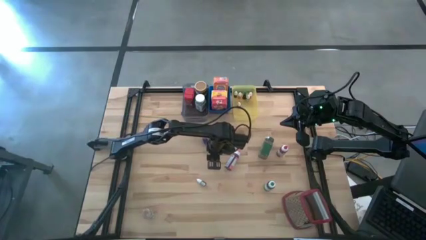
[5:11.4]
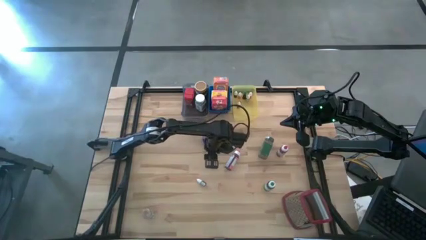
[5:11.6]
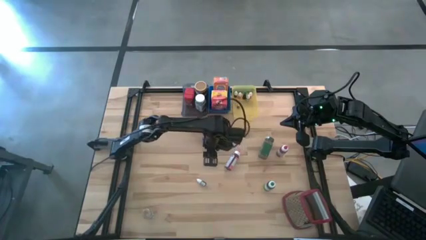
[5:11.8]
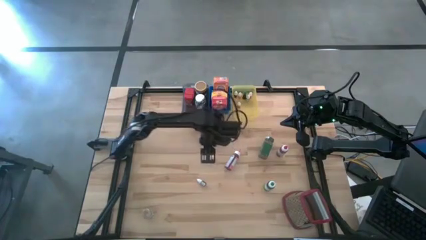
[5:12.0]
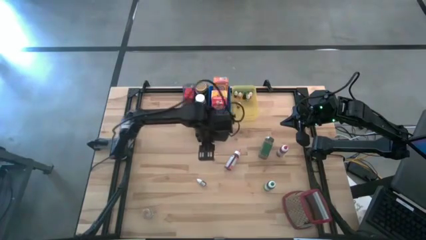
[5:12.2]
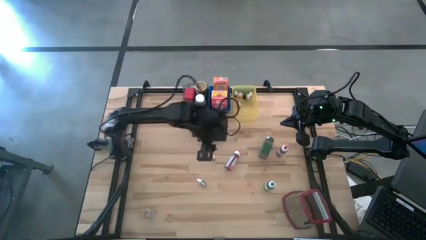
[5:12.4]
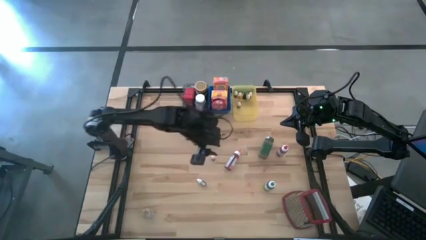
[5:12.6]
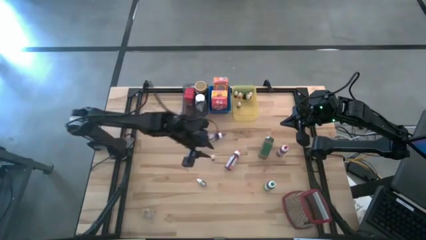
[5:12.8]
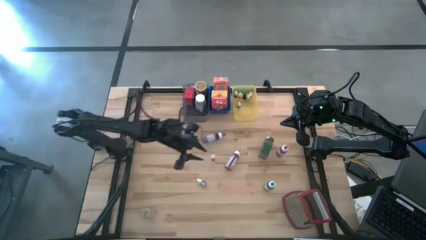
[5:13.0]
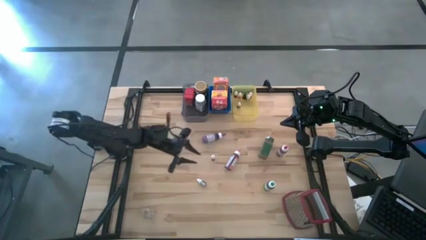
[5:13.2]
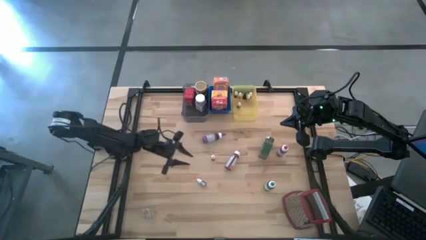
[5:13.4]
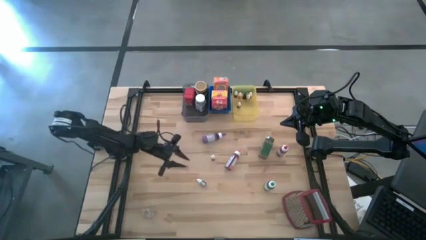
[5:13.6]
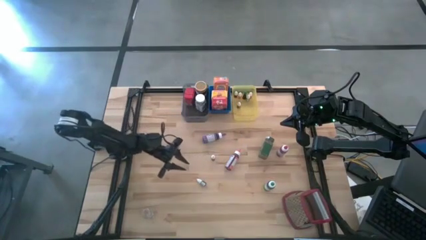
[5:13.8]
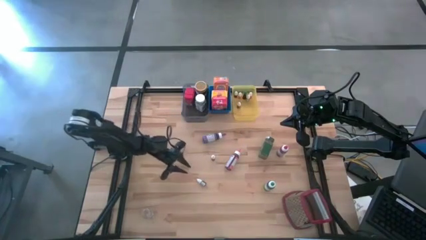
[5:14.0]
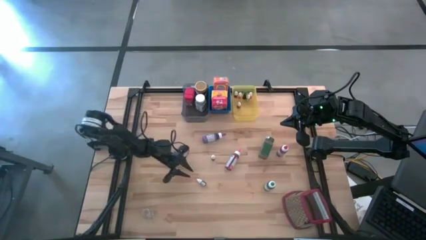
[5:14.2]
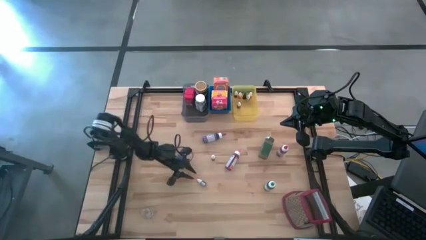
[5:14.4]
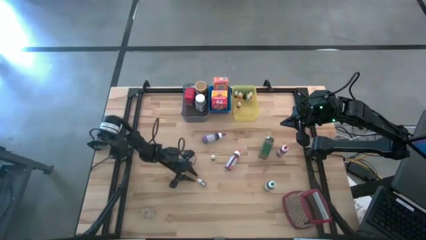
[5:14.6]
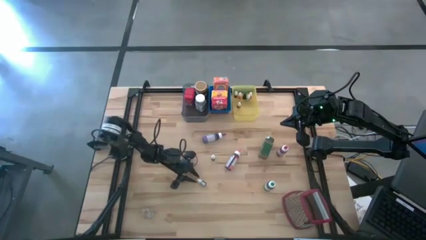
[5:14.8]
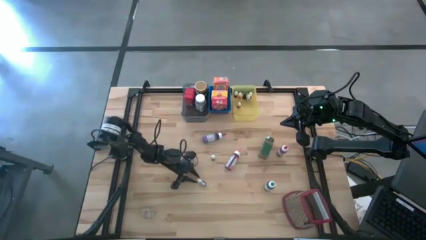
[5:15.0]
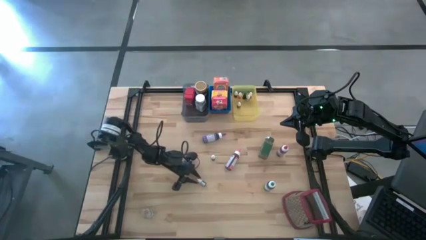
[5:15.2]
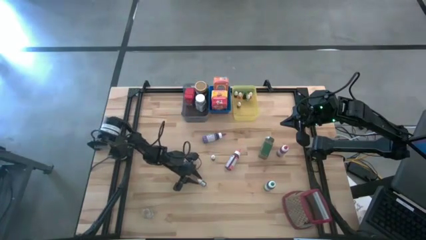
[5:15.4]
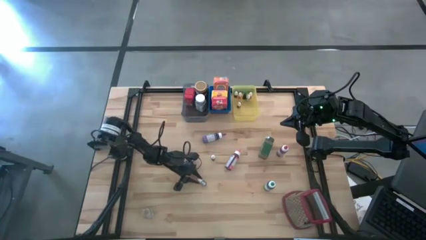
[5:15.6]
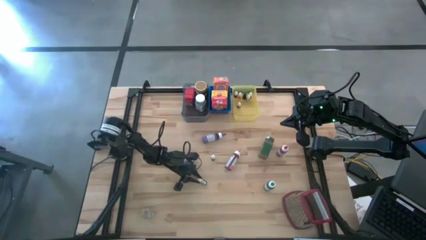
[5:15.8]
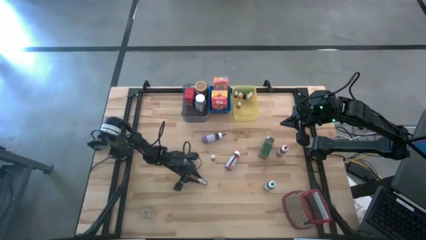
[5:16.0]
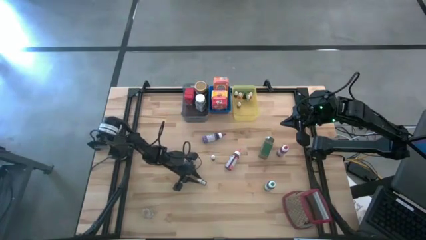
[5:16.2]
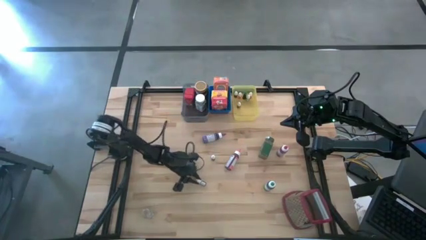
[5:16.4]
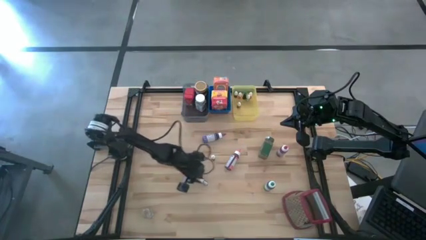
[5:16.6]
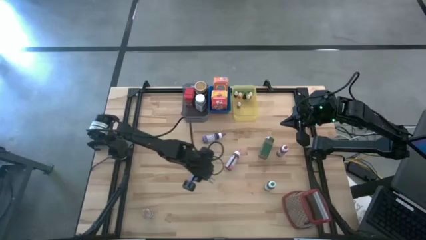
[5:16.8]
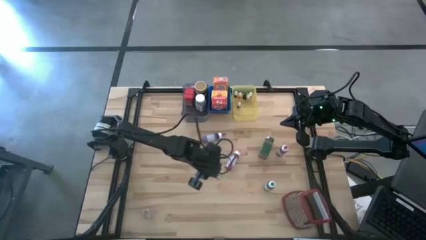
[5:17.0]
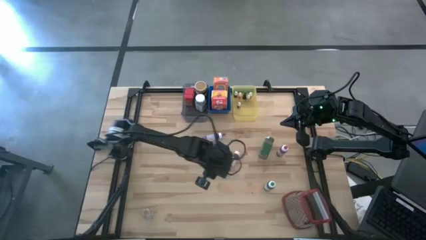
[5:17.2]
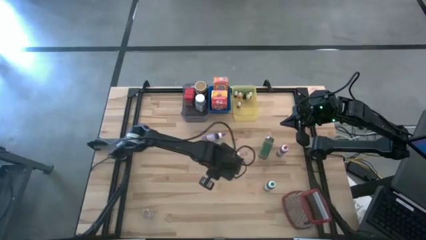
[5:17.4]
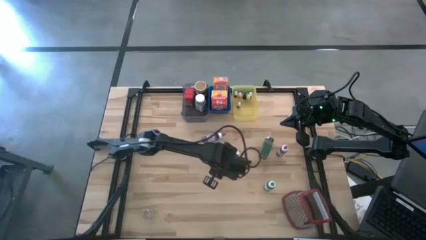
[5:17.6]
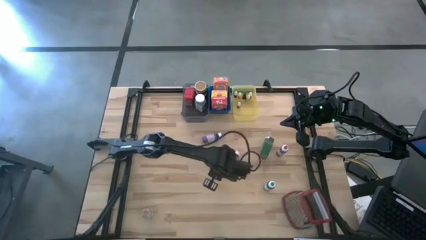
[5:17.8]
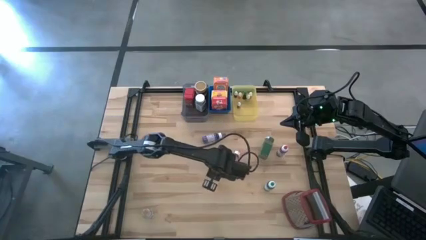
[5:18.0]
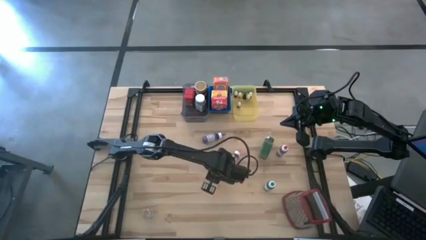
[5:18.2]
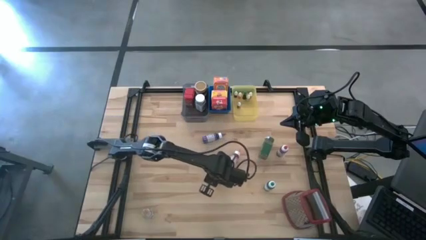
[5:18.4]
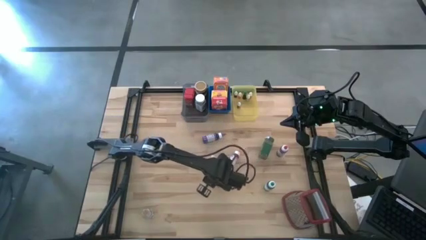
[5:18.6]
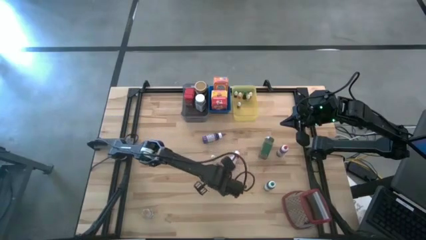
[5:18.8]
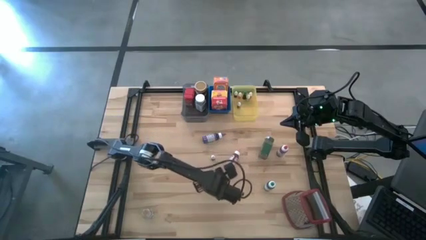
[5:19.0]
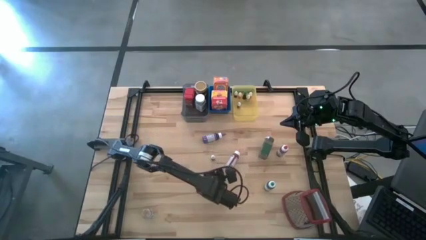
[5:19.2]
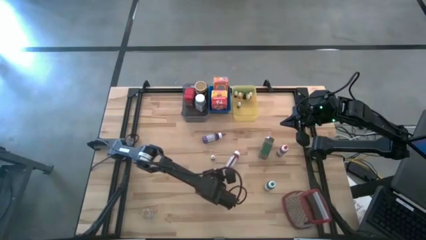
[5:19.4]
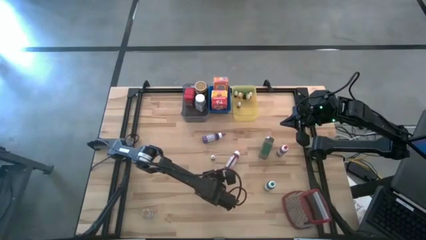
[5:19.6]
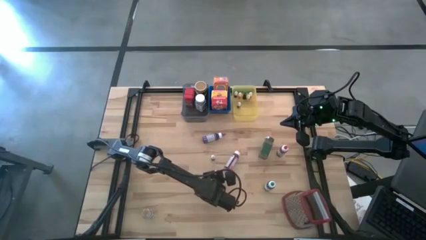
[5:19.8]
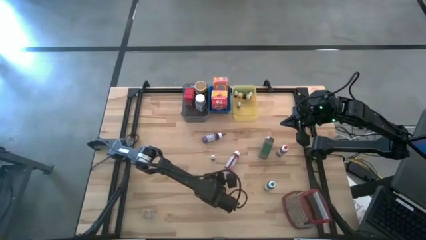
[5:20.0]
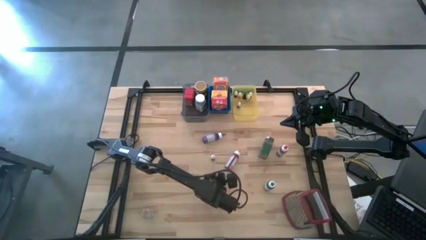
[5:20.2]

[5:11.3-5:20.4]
Task: Pick & Place Kitchen Items
Move the small pink food coloring bottle to the center of the table

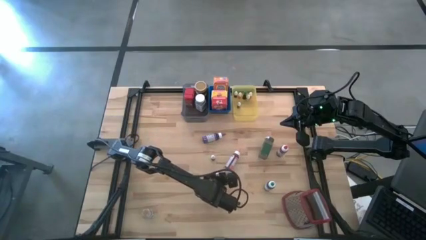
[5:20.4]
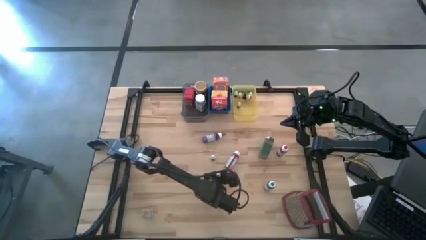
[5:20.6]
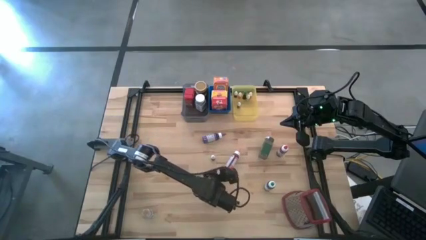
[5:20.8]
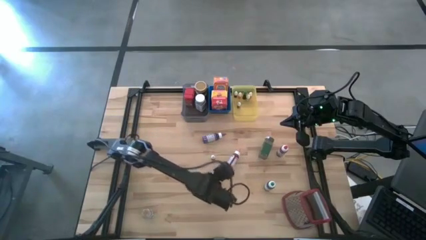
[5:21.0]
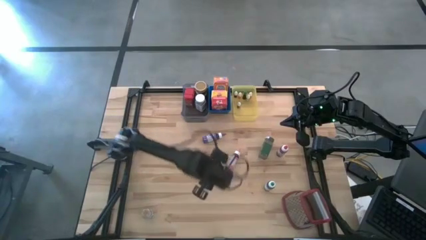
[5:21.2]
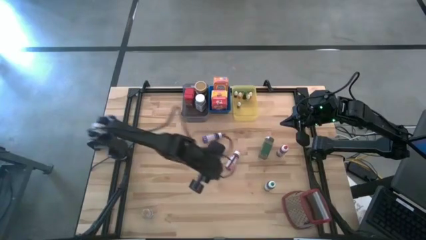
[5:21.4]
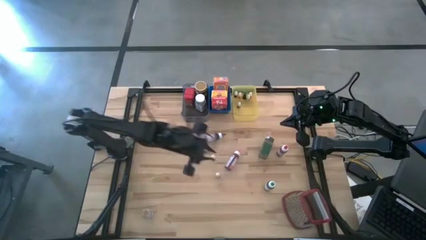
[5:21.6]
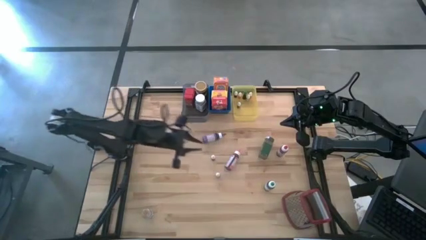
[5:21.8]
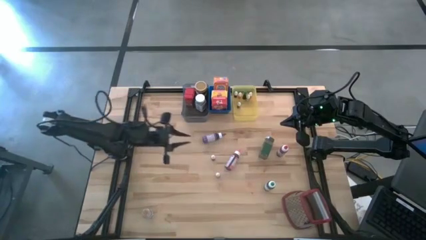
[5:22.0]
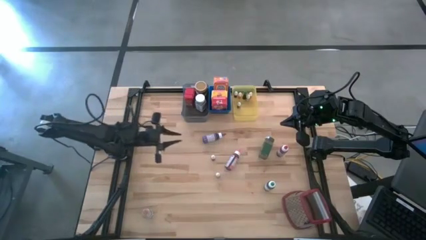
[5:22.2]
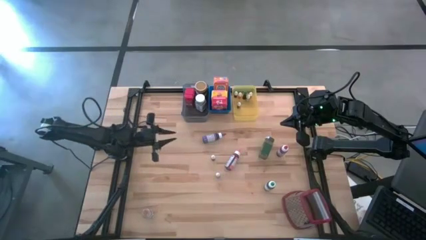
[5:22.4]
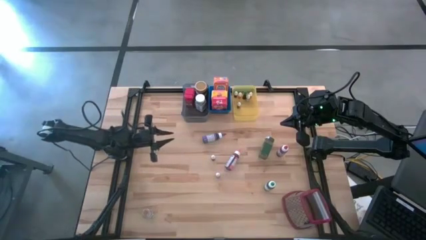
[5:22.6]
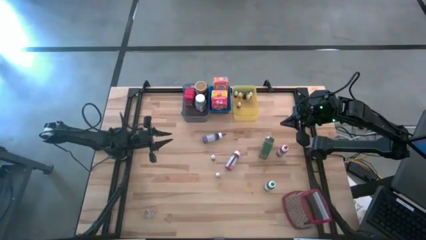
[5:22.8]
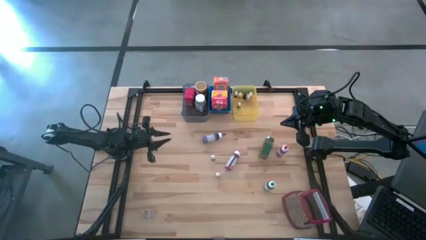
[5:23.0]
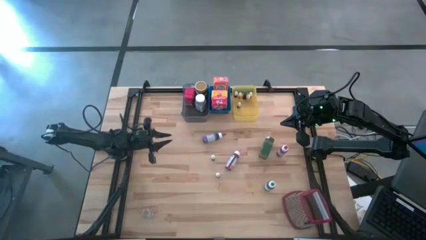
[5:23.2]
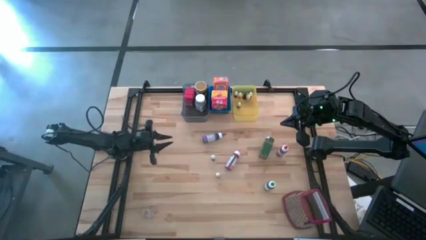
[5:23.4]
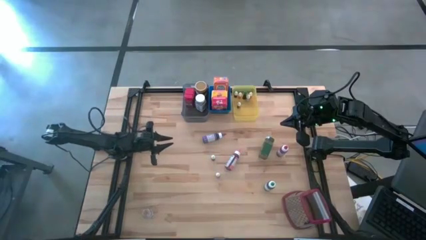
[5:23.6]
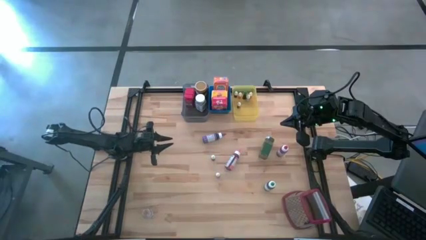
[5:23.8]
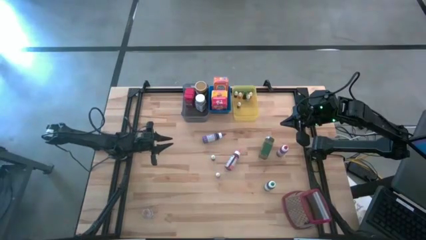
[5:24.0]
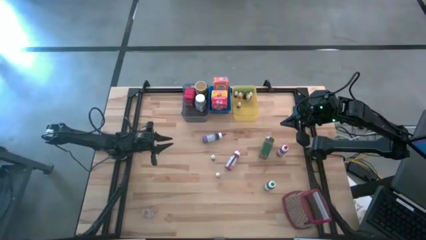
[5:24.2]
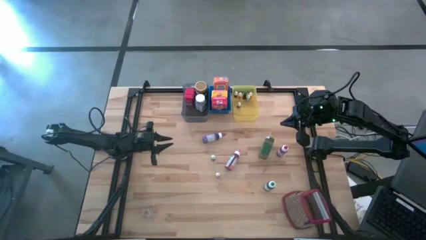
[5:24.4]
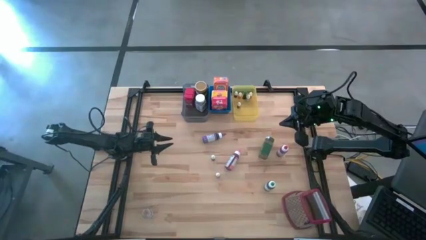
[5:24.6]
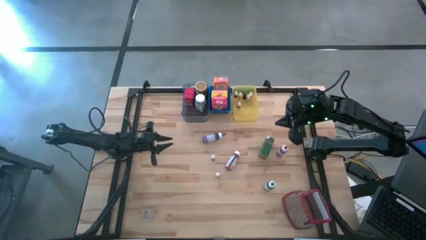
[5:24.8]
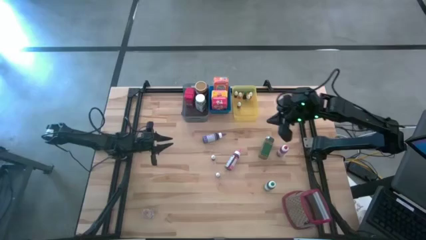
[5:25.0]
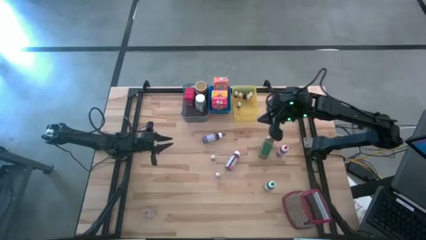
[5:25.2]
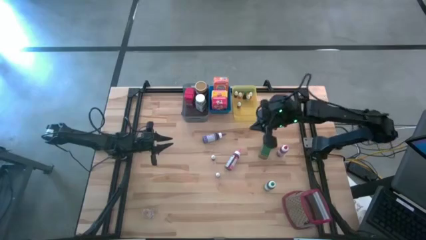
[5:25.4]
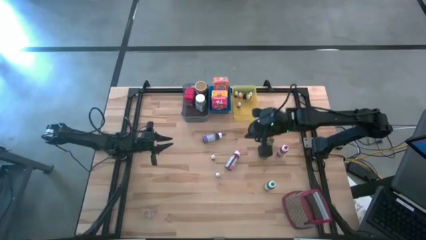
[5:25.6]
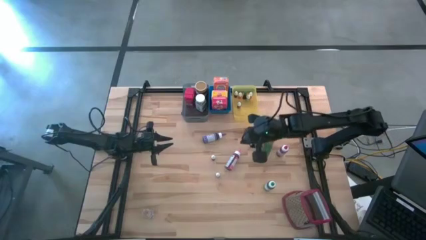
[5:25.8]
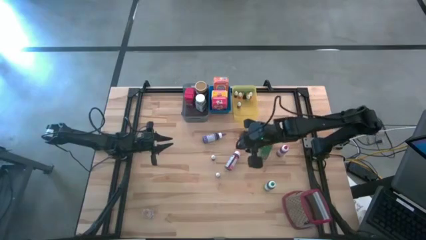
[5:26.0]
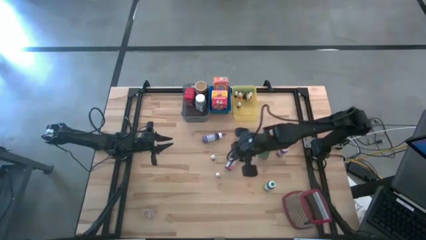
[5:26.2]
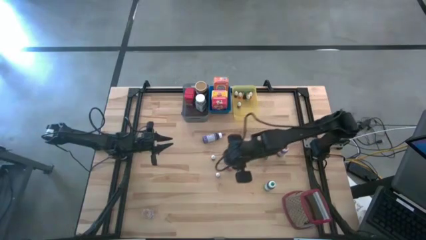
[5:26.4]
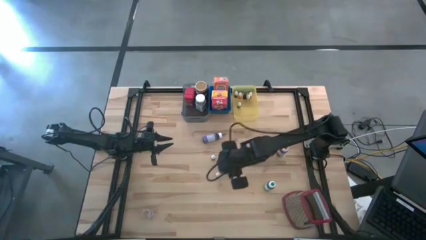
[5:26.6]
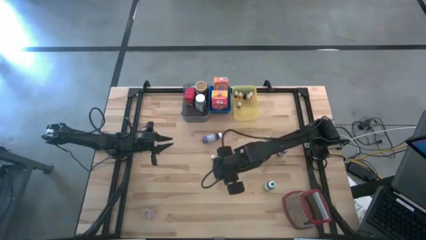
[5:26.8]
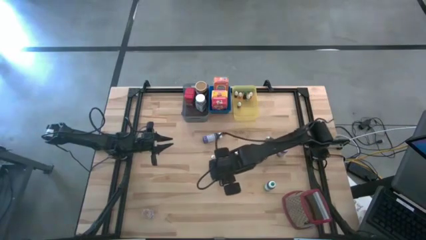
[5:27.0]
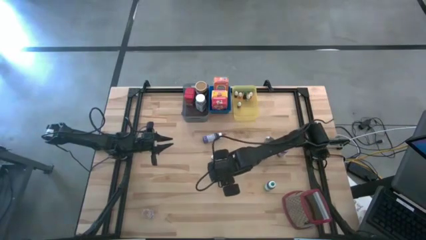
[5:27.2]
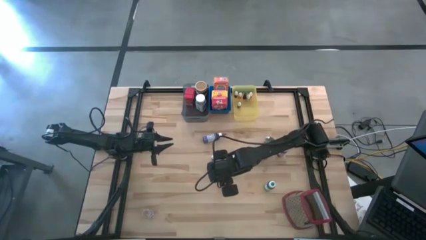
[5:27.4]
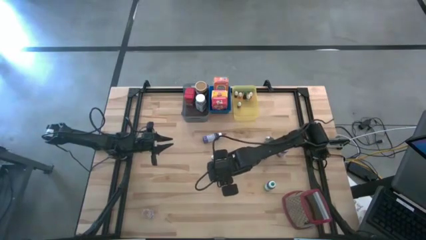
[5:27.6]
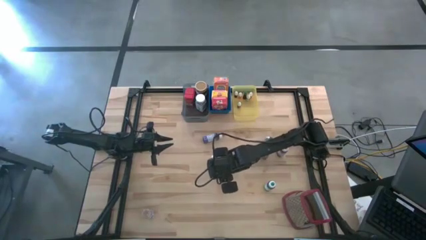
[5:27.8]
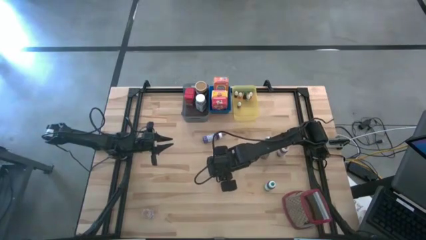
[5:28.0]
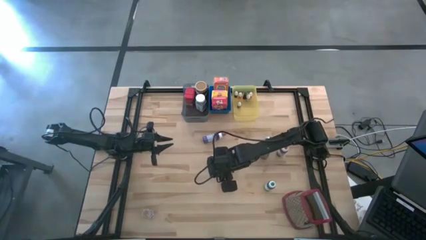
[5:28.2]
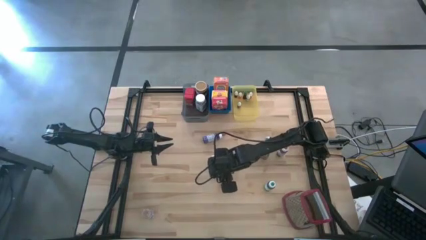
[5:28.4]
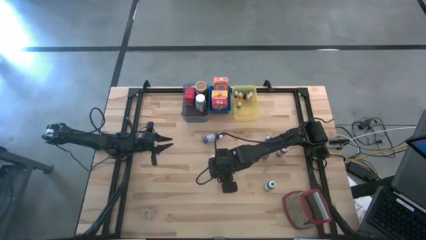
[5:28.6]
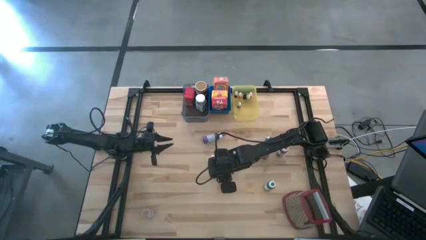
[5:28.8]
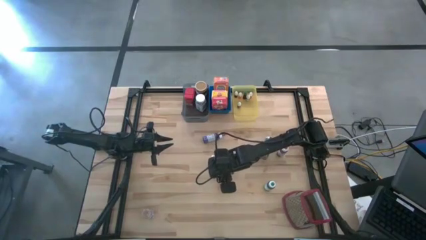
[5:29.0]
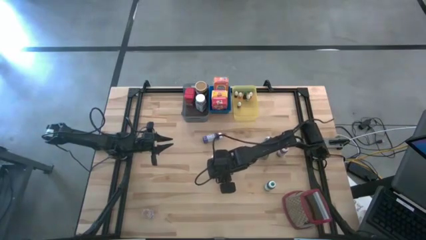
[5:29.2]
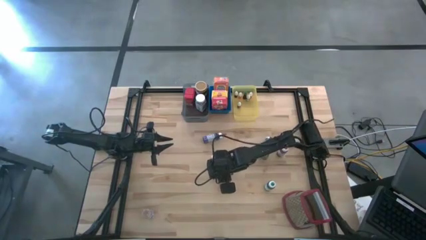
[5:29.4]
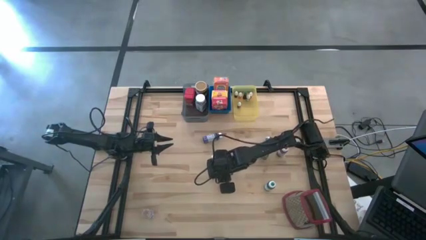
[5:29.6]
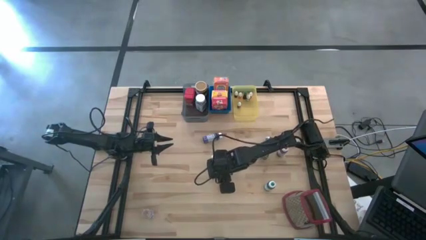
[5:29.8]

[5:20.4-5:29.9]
Put the small pink food coloring bottle into the yellow bin
